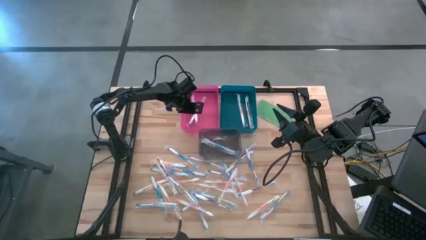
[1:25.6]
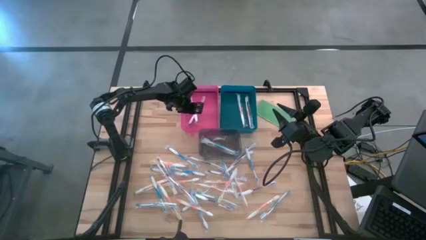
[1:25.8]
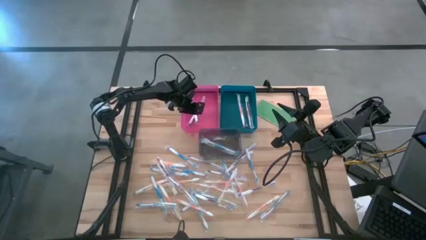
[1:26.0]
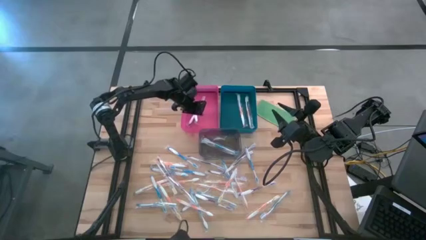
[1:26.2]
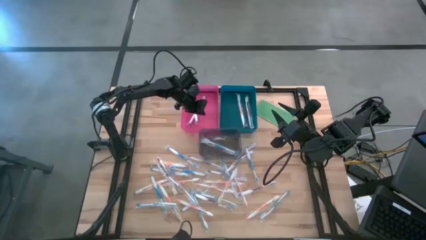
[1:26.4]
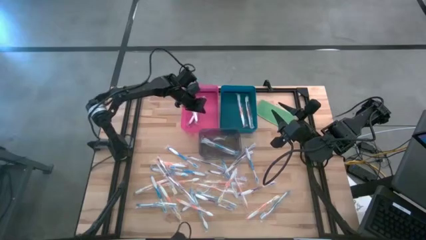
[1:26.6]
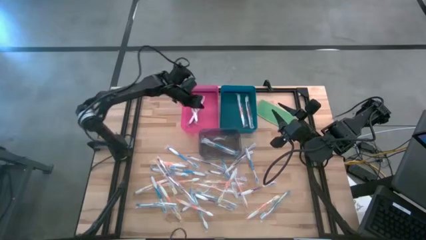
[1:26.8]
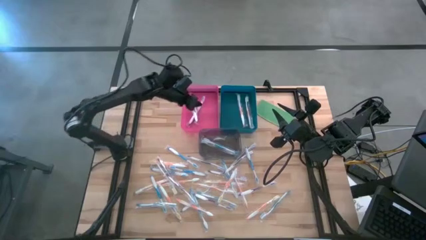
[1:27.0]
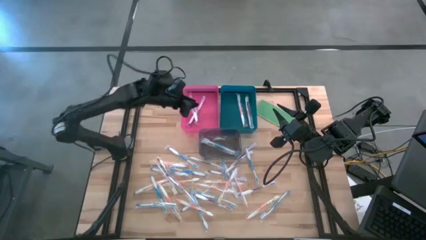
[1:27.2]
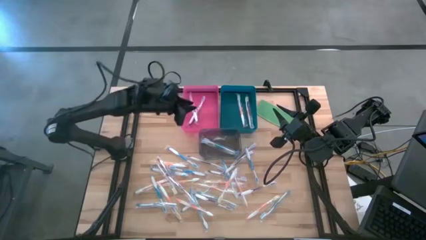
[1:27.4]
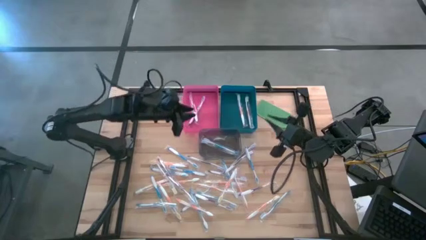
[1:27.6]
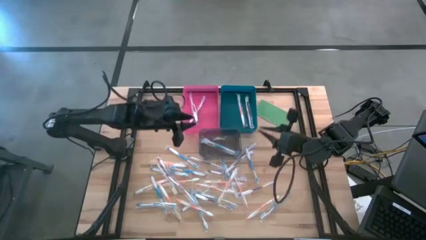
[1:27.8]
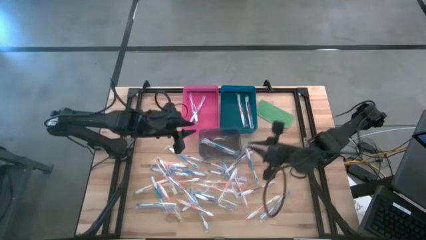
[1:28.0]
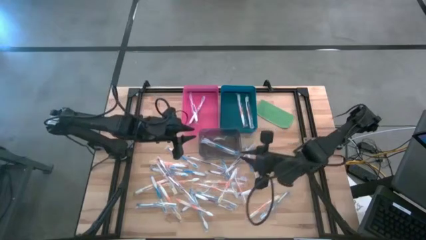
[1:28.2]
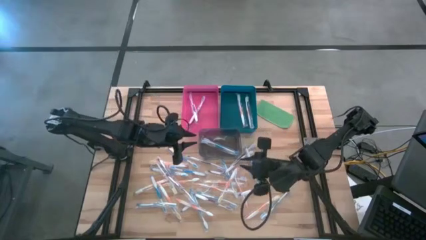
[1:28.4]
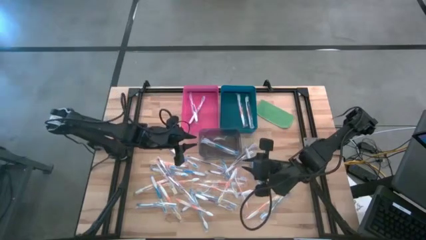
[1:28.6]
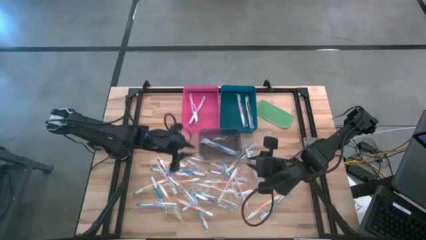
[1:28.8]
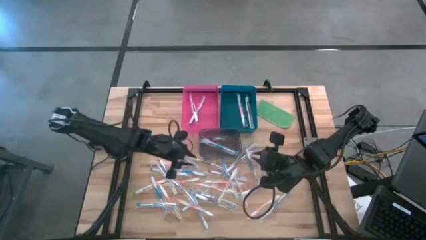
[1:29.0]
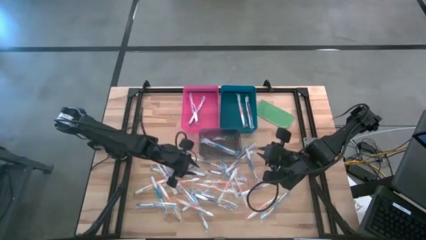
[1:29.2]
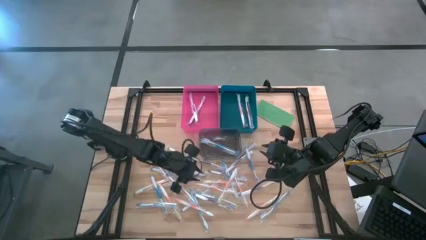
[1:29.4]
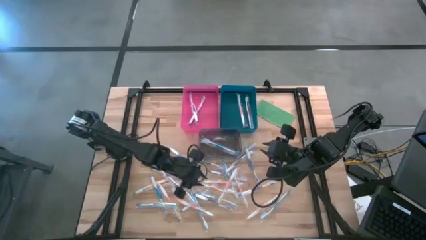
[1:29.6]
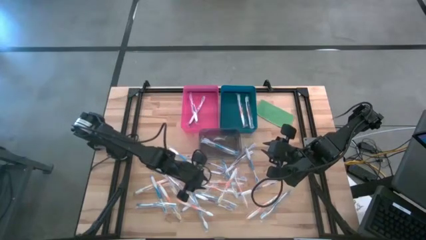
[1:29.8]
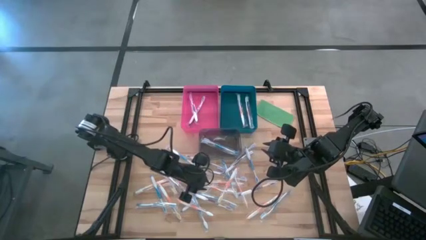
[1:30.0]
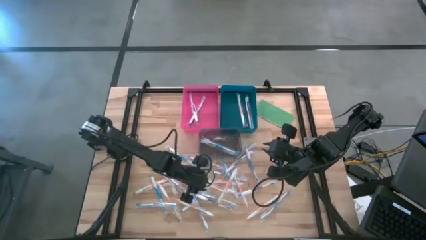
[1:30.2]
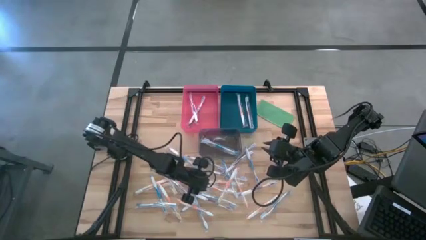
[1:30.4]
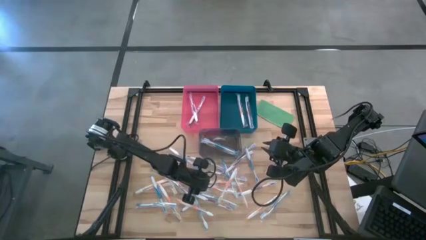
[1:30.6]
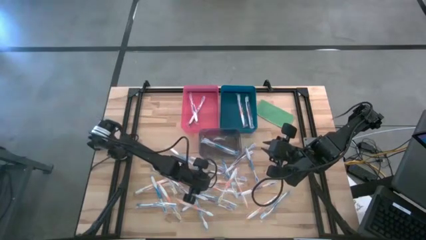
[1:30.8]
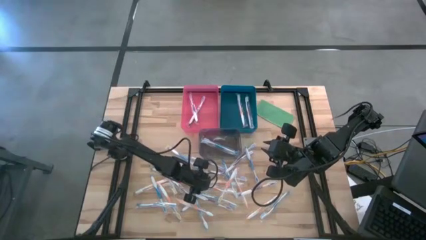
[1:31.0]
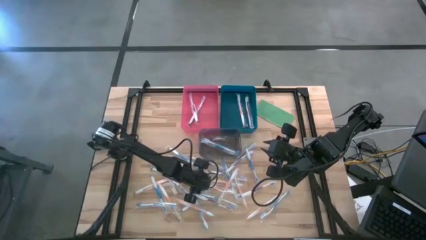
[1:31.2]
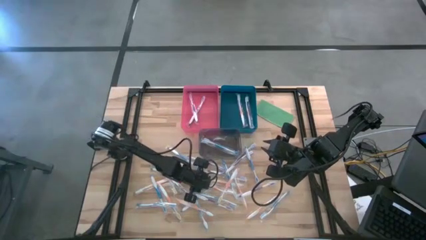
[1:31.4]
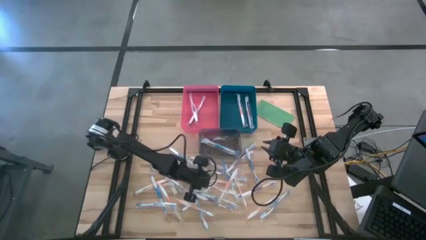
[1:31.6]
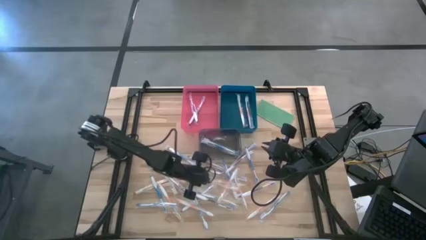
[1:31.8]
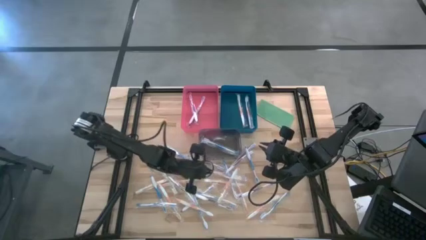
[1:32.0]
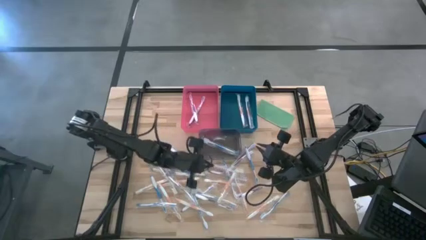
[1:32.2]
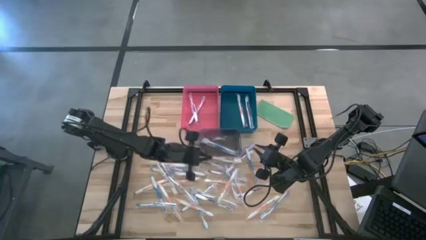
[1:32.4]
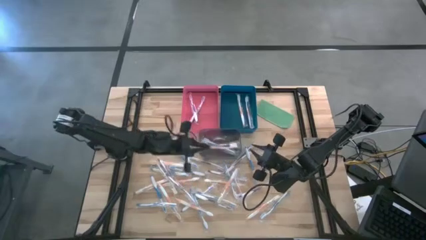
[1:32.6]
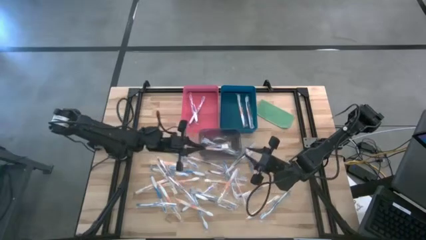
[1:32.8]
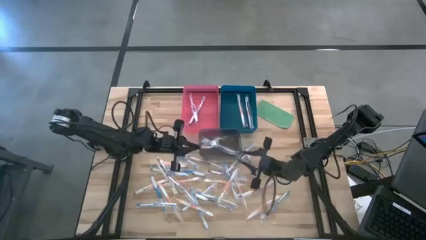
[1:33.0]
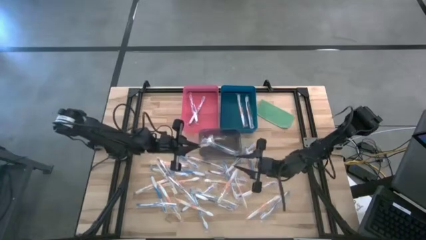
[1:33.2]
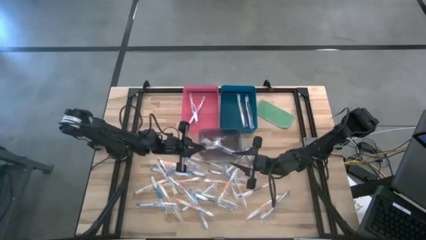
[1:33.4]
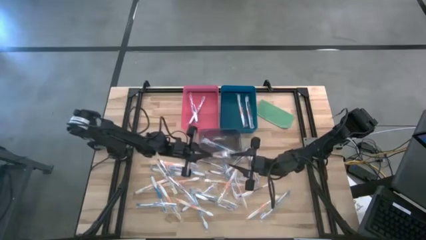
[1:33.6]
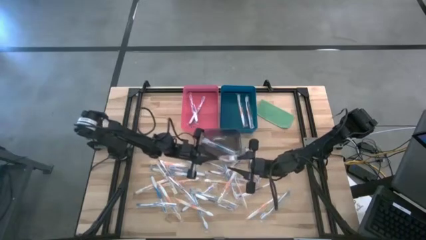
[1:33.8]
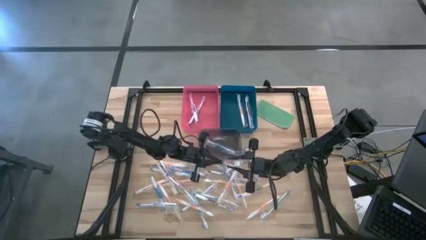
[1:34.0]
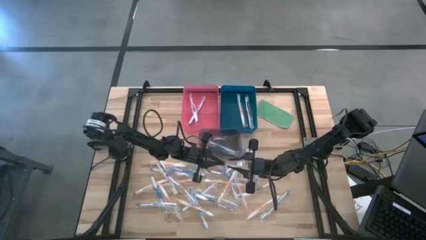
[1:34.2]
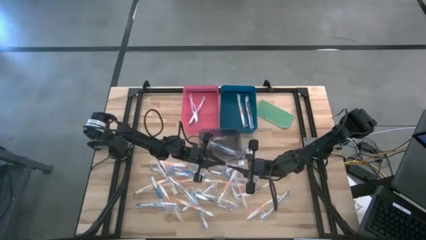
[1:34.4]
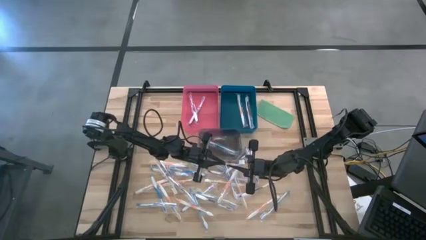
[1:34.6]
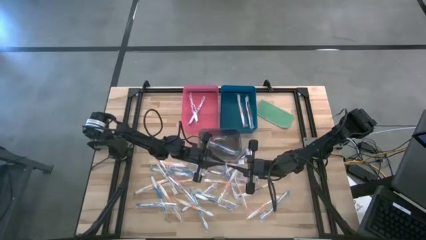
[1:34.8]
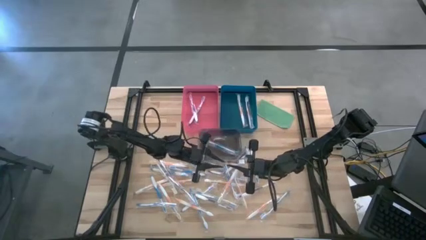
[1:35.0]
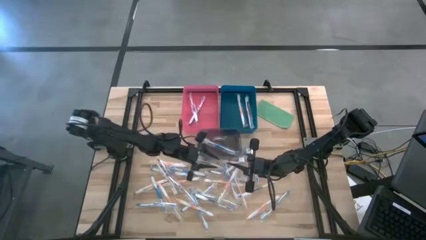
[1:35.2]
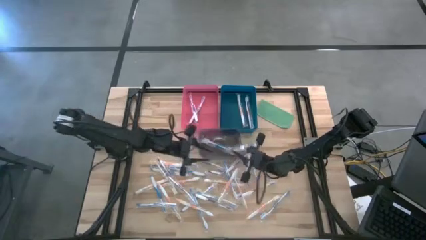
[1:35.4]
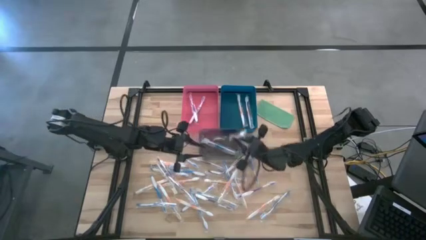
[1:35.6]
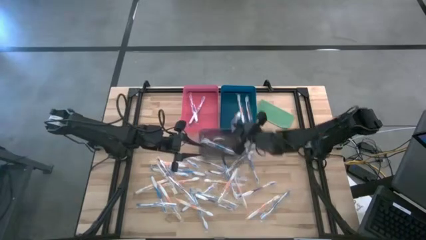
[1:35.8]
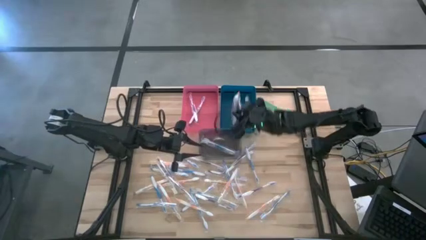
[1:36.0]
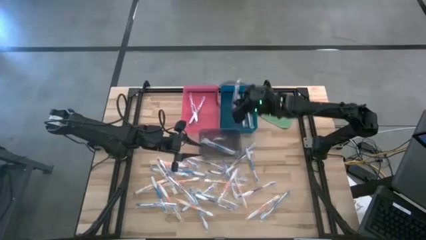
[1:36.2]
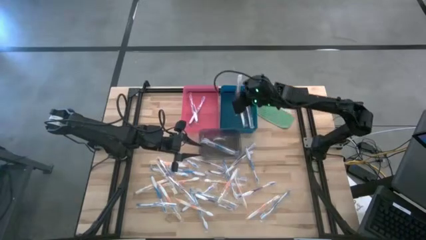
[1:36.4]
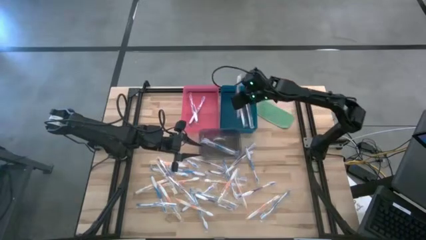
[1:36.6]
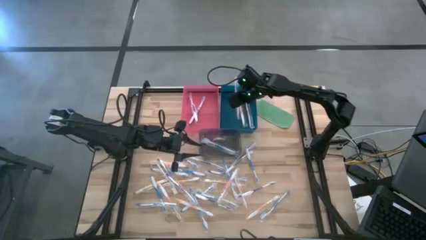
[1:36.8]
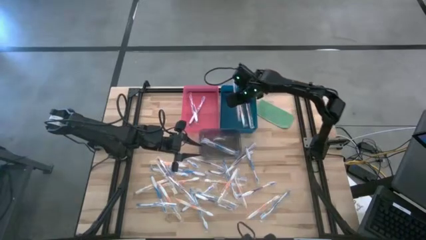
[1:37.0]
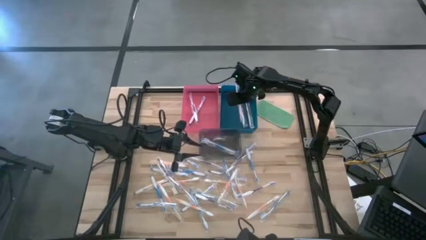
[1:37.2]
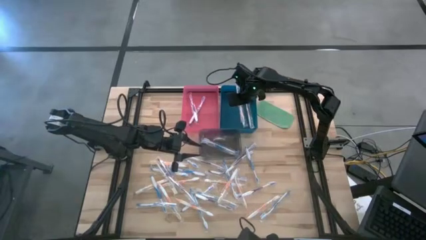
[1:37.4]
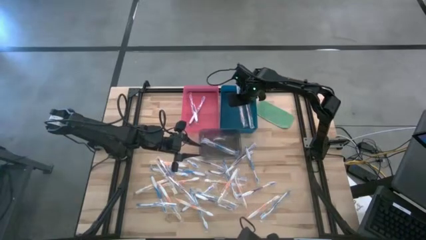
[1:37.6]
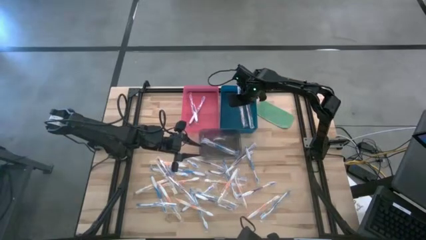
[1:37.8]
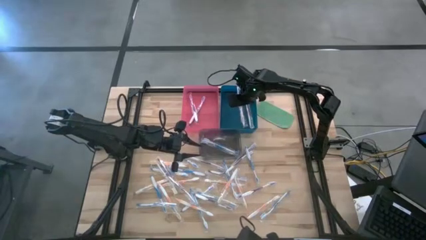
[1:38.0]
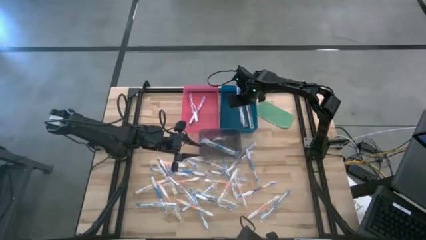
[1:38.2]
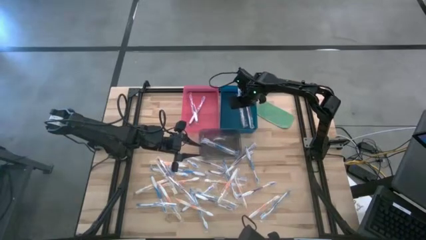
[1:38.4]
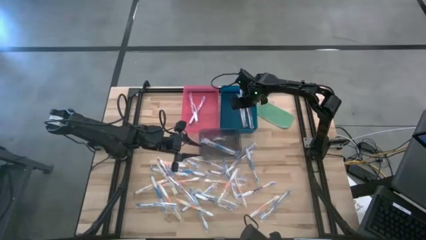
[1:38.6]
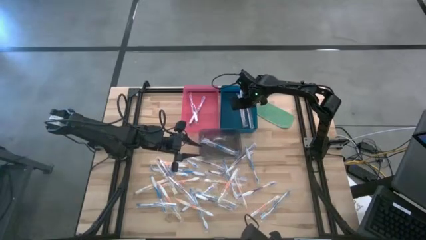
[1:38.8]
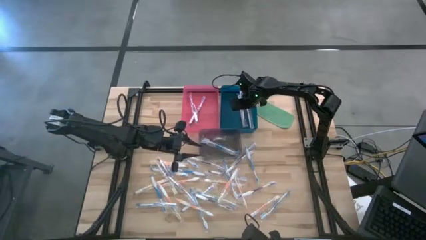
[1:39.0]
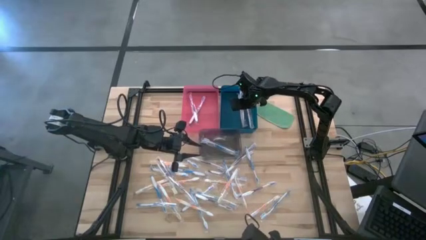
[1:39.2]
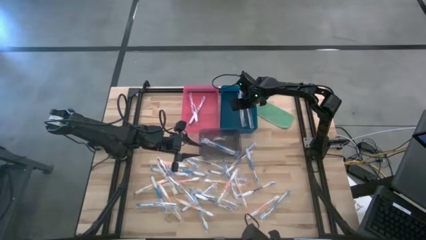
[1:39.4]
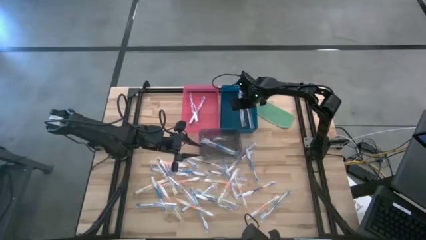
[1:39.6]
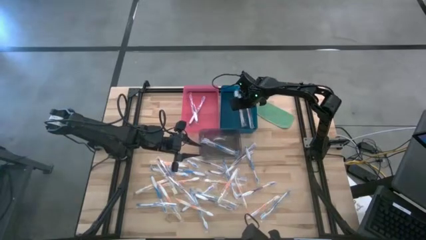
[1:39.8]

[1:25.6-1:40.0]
Task: Pick & Place Toothbrushes
Put the orange toothbrush into the blue bin

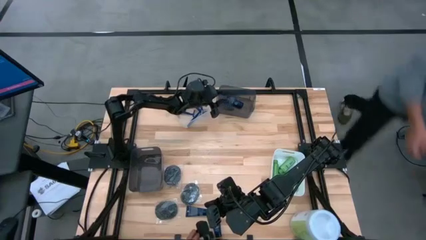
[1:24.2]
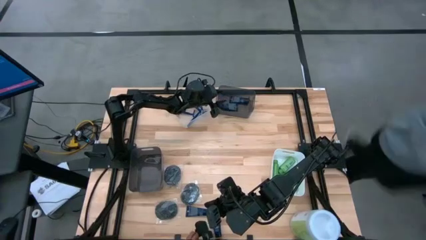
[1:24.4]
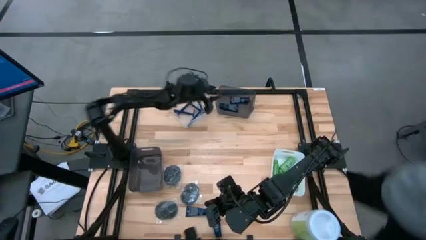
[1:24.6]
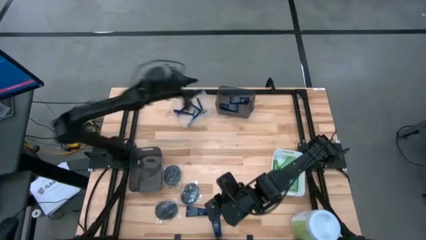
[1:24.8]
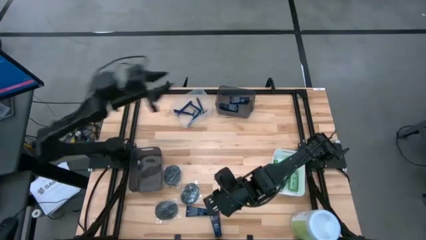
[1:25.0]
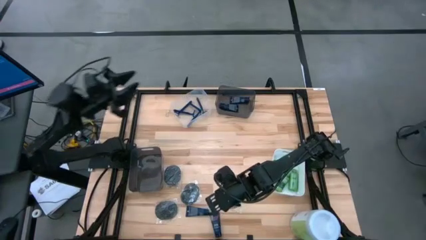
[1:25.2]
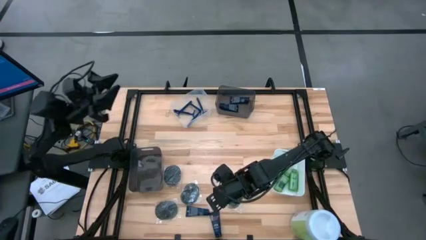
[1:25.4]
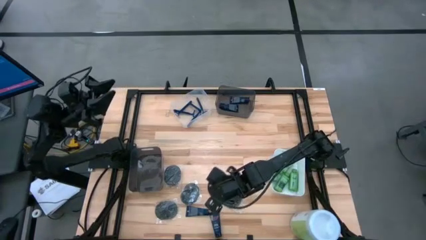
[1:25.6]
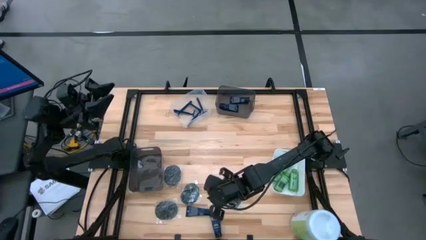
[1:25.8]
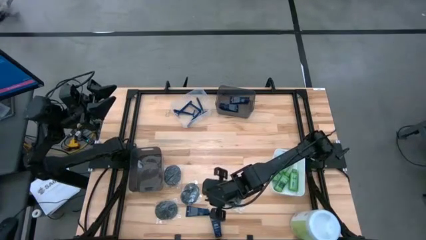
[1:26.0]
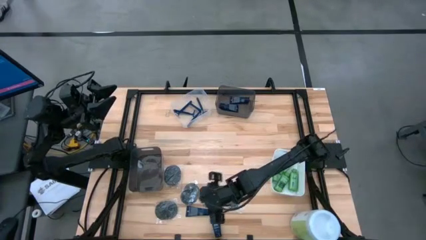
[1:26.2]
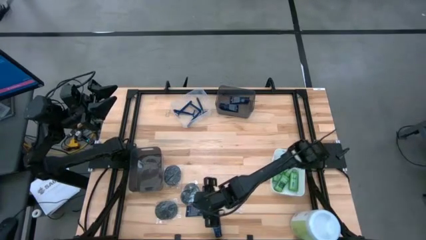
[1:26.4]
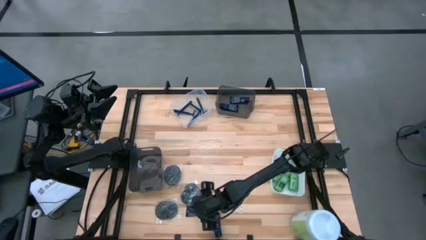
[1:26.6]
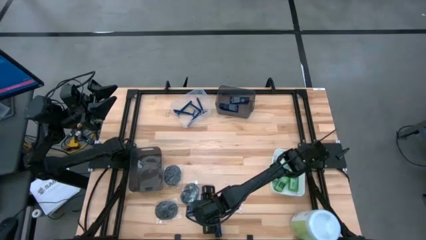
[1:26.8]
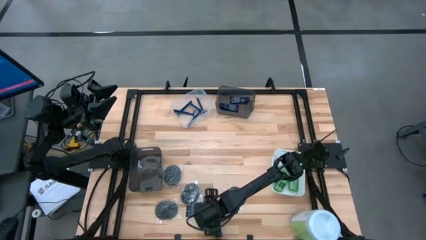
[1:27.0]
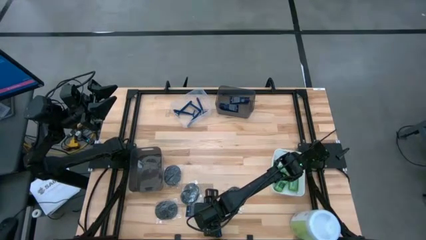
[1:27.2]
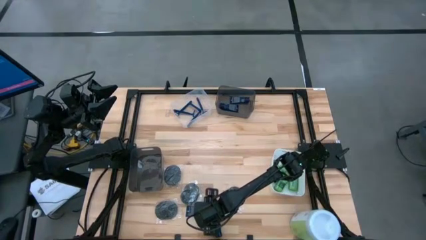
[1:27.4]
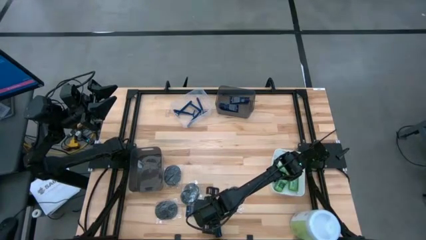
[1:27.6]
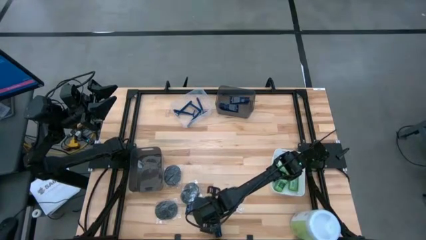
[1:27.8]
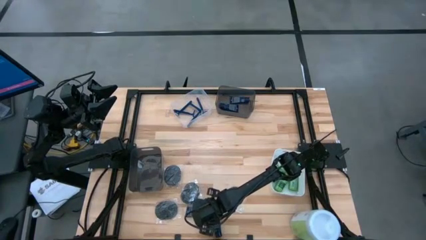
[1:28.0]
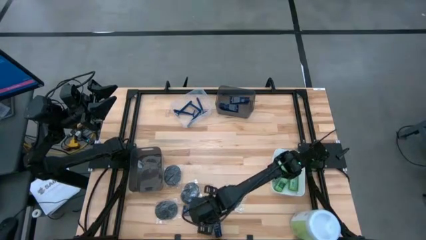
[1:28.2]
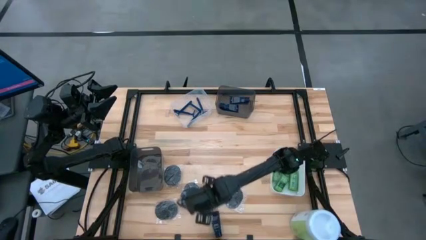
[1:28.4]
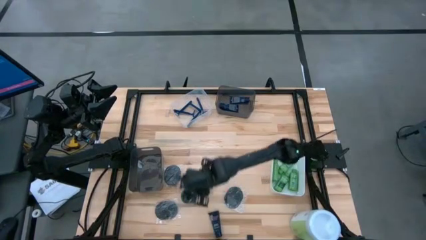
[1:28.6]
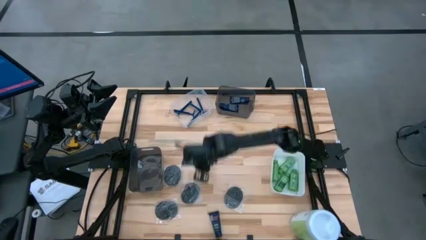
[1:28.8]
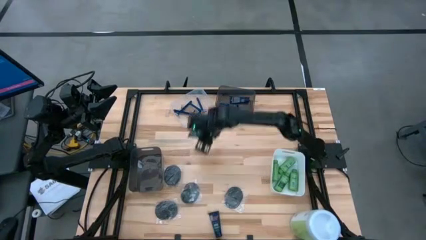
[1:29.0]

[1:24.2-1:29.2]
Task: Pick & Place Travel size toiletries
Put the blue shave cream into the top black bin
